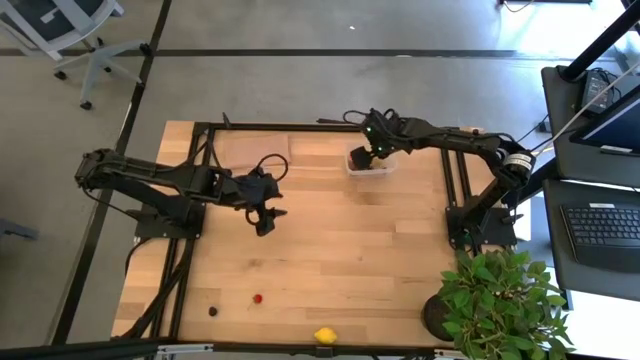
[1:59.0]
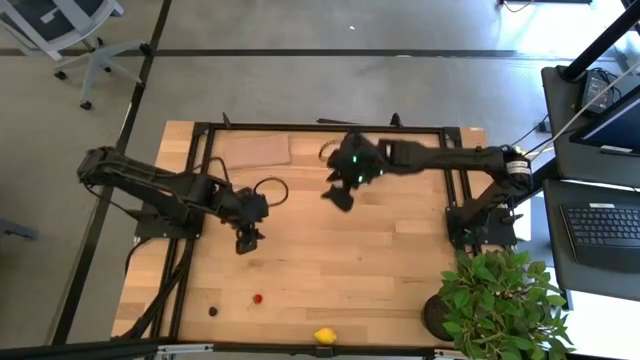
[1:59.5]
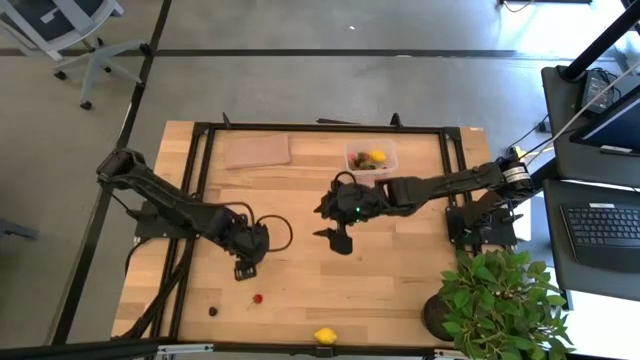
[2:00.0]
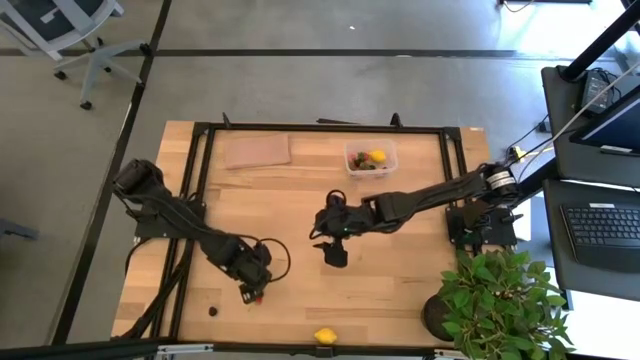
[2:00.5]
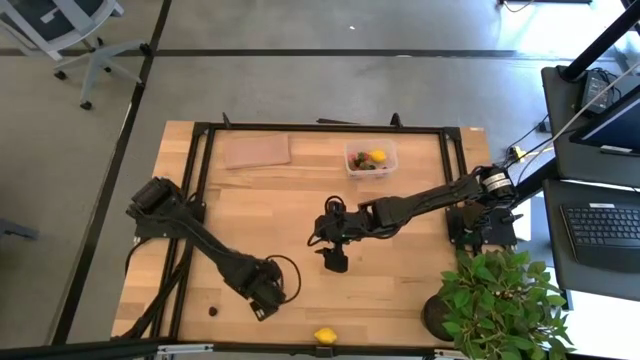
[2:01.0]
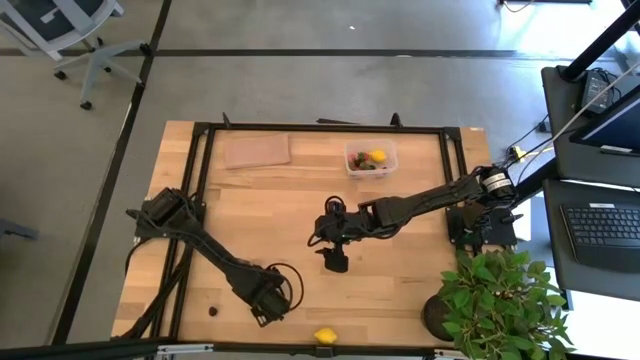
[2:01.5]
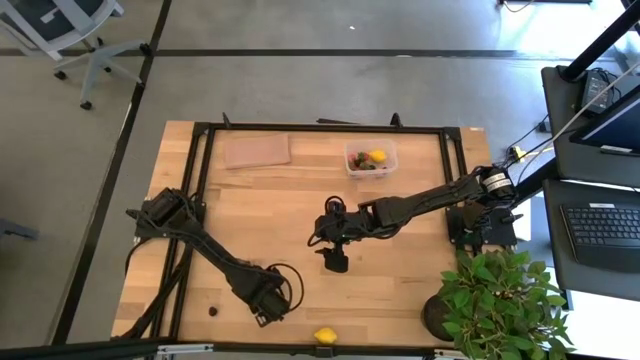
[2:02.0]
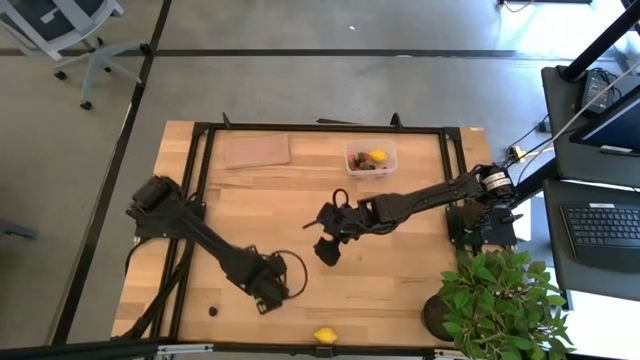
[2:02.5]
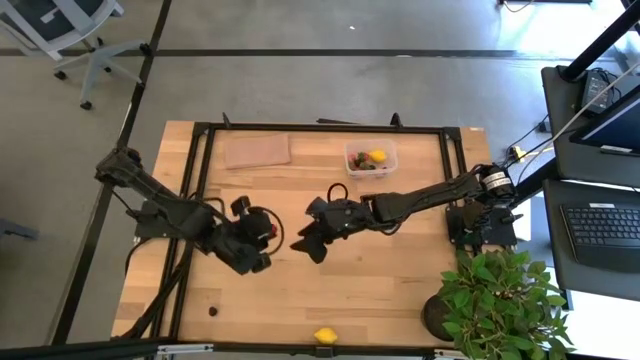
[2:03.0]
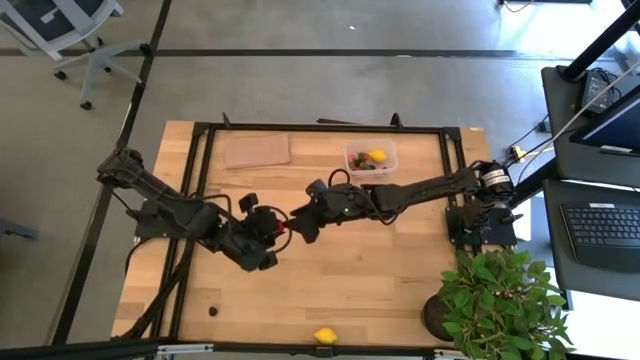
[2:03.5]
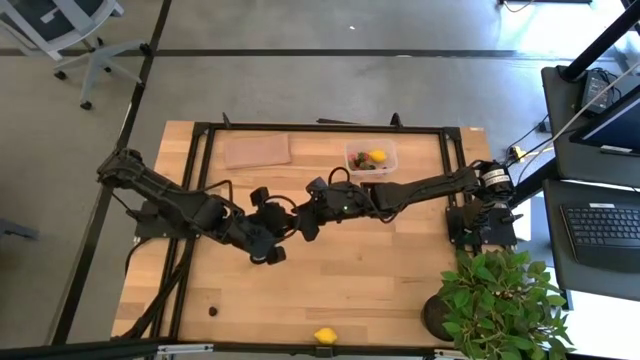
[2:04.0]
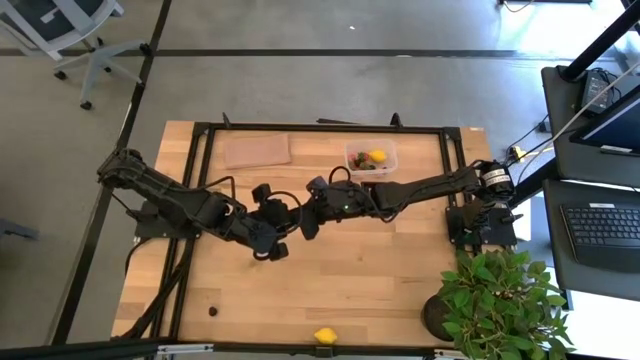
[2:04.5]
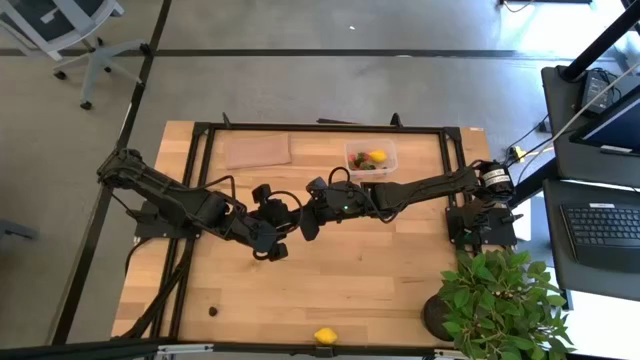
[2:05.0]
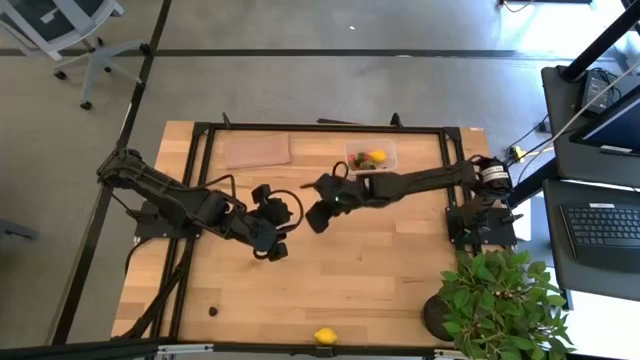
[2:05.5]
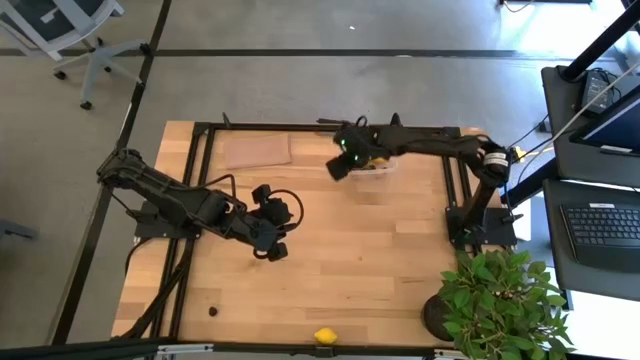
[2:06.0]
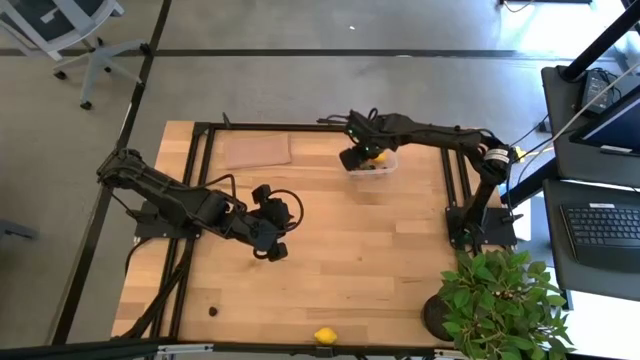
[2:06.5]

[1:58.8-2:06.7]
Task: Pick and placing Produce into tupperware
Put the strawberry into the transparent bin

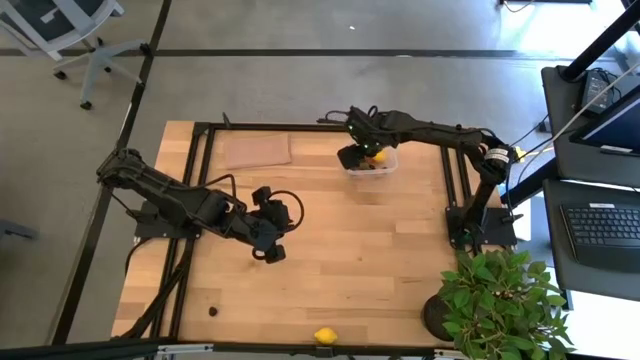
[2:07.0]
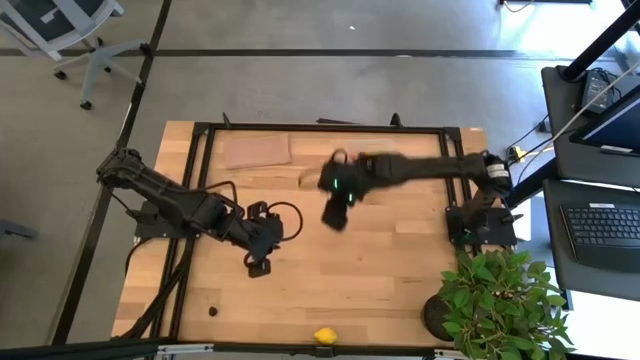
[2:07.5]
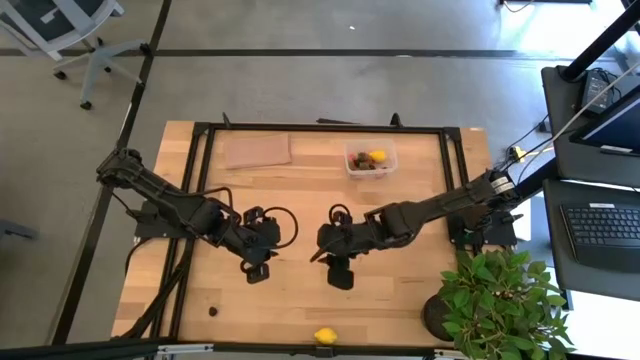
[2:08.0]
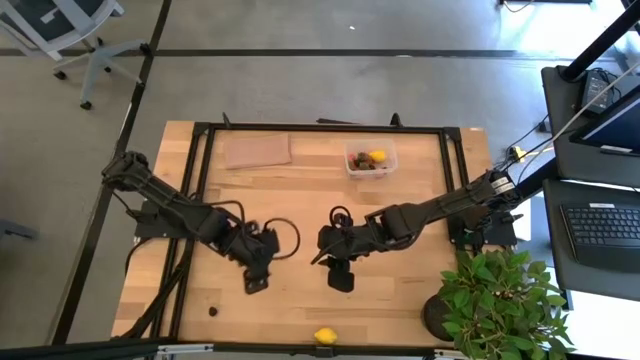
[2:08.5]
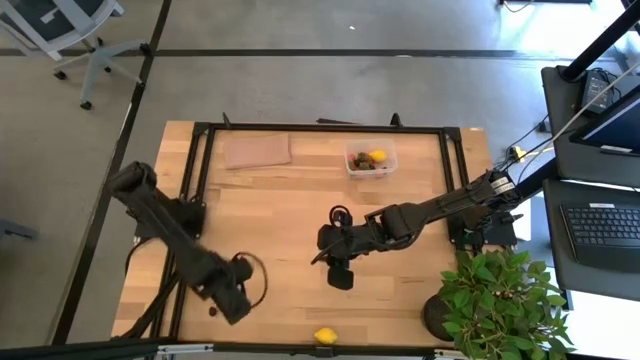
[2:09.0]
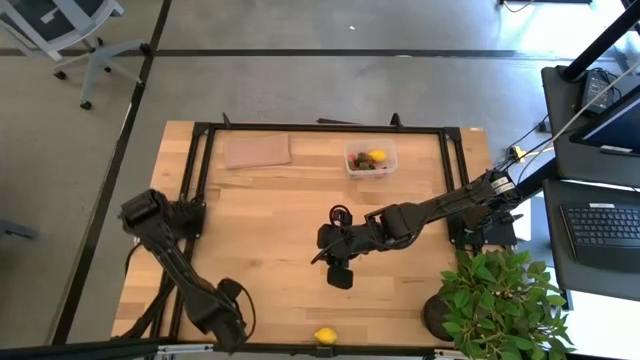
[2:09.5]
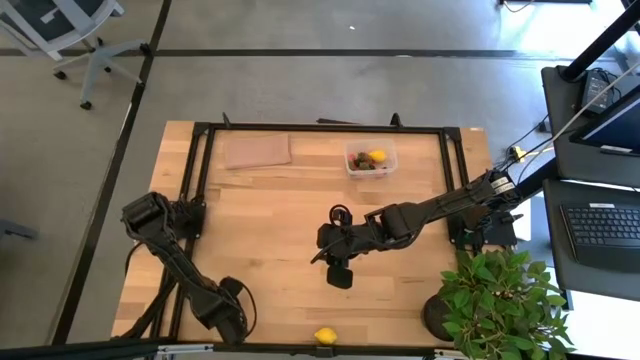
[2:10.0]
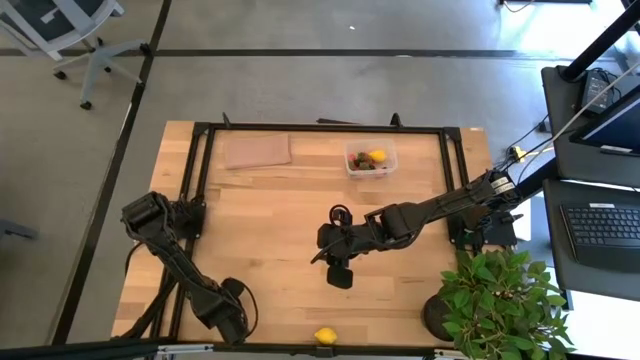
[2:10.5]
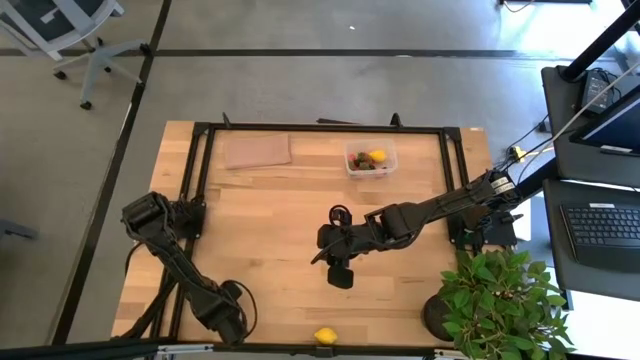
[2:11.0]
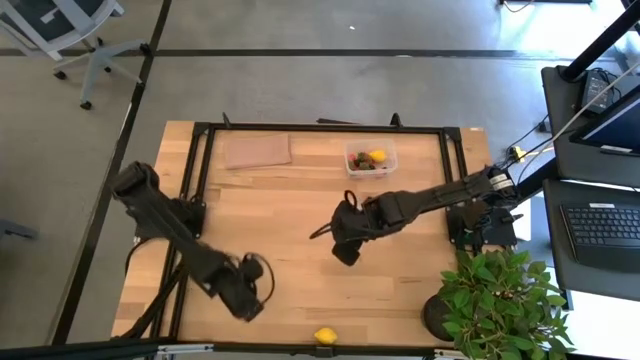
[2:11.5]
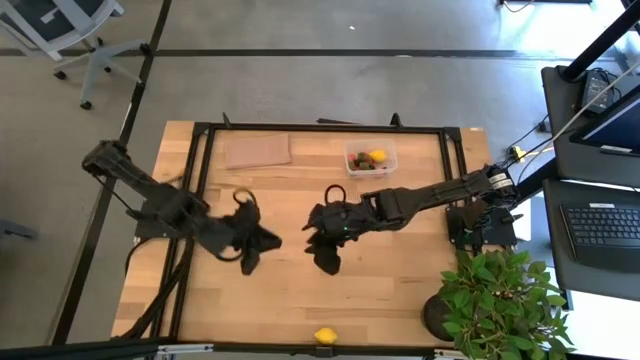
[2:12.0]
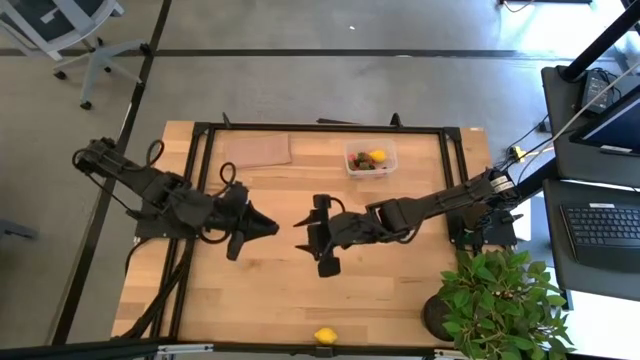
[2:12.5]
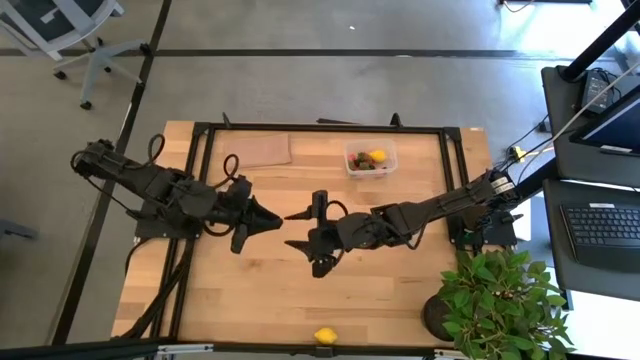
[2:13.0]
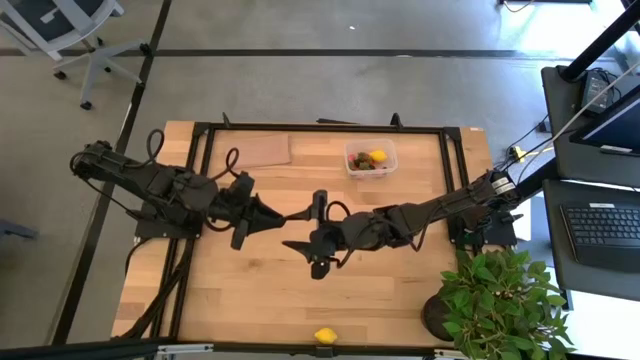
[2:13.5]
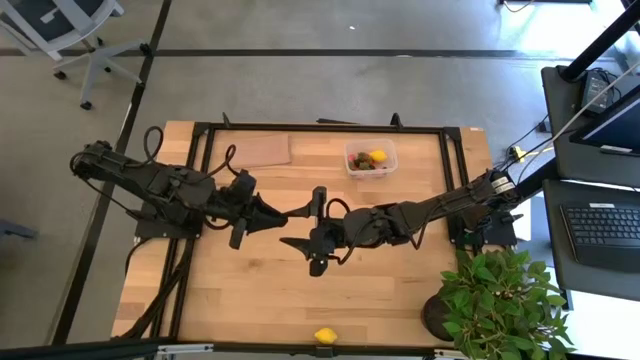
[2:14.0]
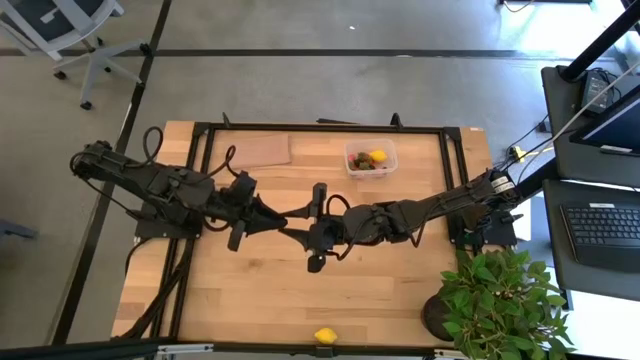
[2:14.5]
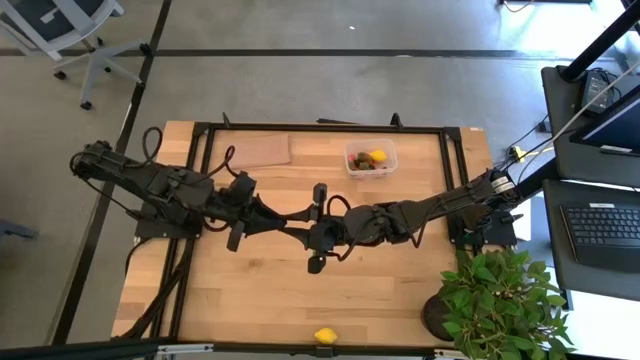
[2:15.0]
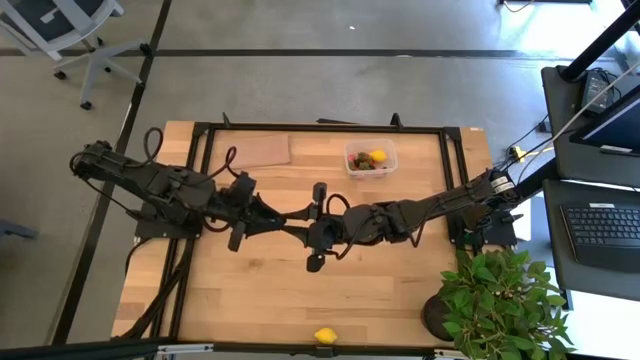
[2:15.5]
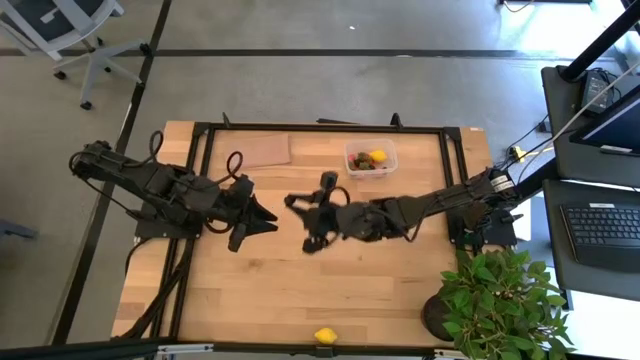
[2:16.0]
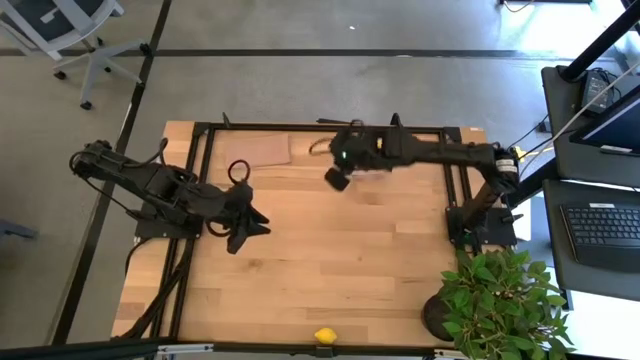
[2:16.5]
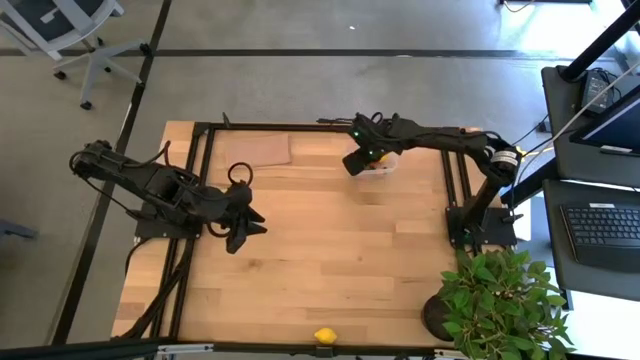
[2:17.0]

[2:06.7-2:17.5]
Put the blackberry into the transparent bin

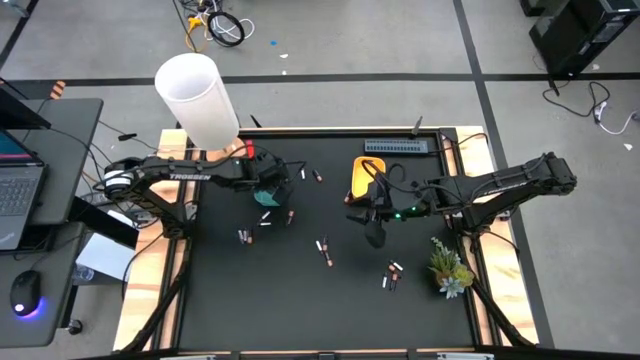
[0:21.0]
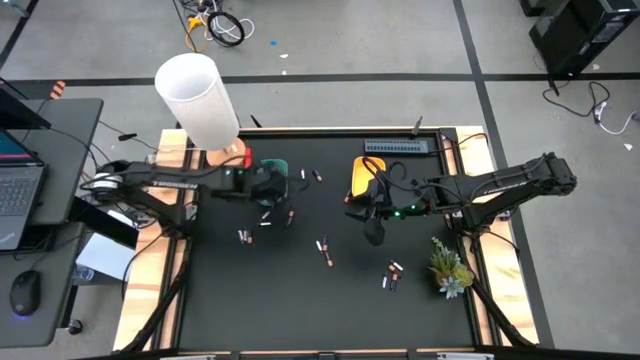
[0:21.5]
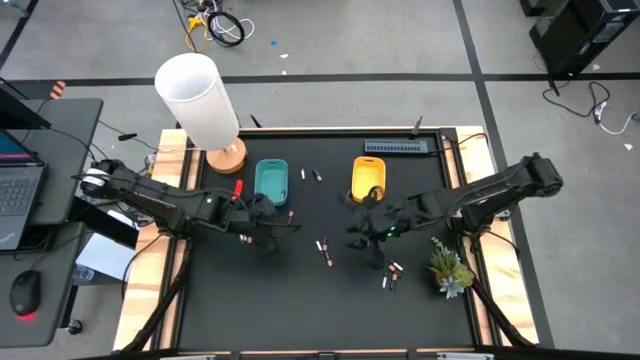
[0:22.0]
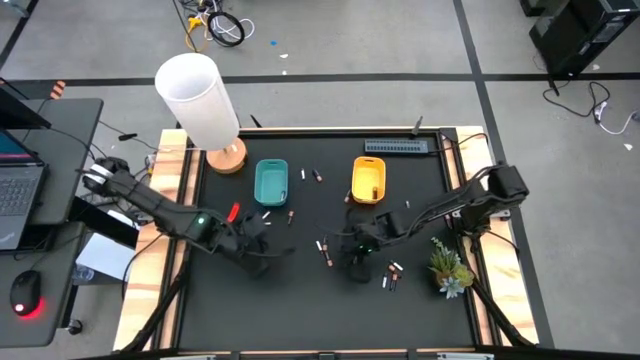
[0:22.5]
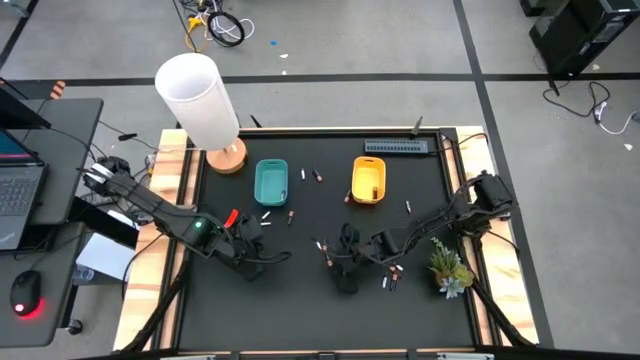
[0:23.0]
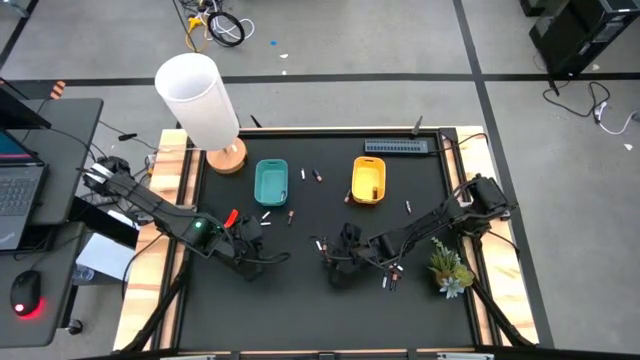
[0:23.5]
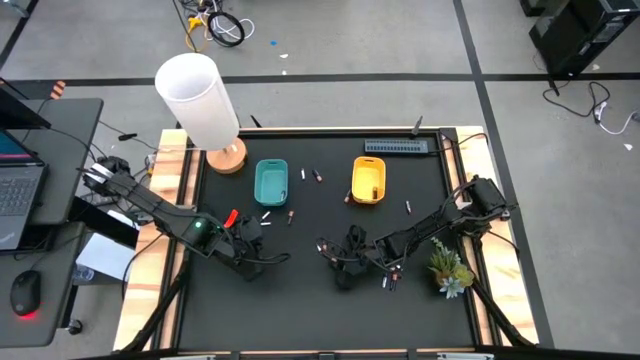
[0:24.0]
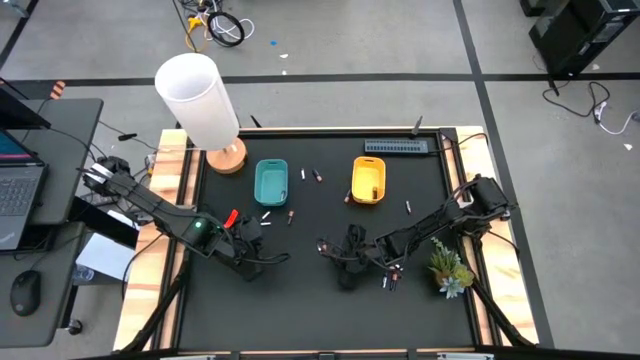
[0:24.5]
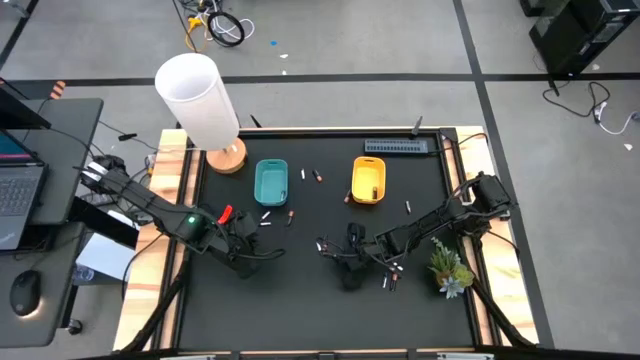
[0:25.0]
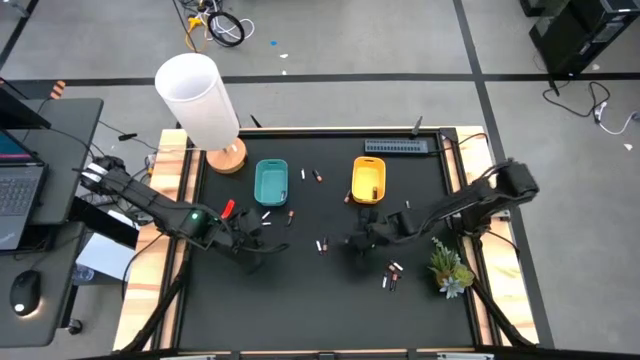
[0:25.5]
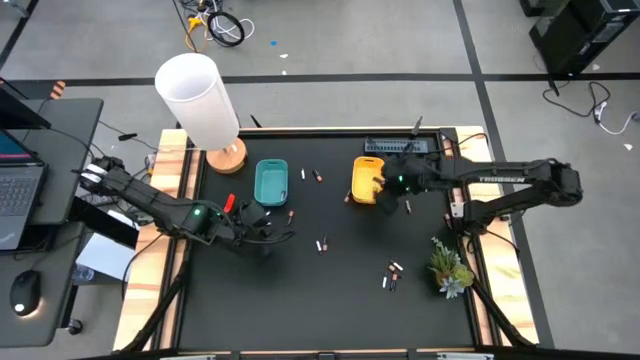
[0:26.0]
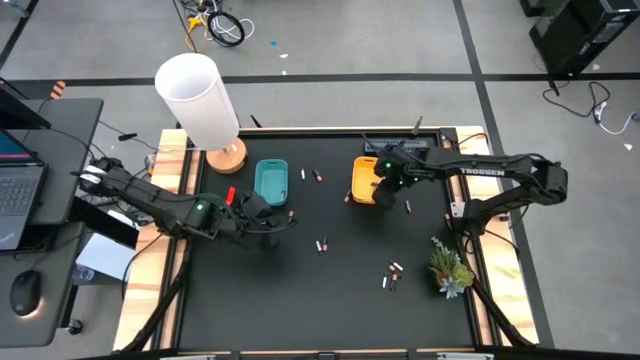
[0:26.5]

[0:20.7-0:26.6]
Task: Sort batteries
Put the black battery into the yellow bin
